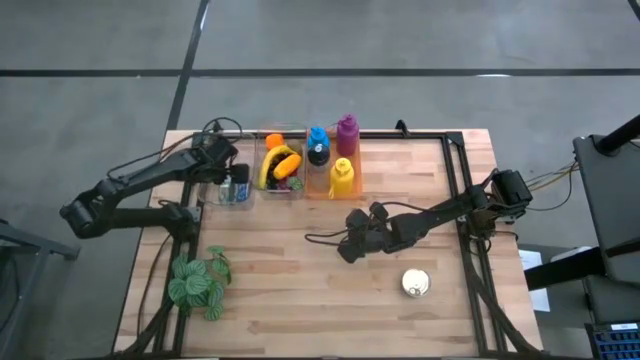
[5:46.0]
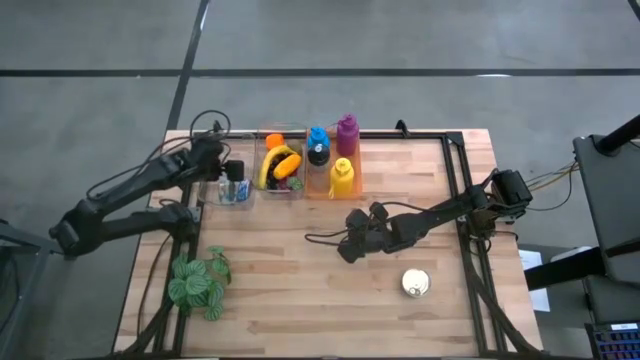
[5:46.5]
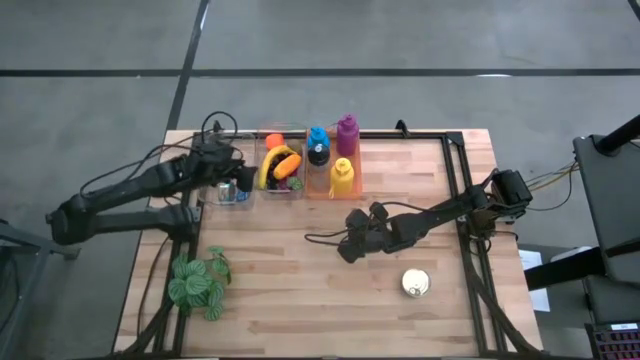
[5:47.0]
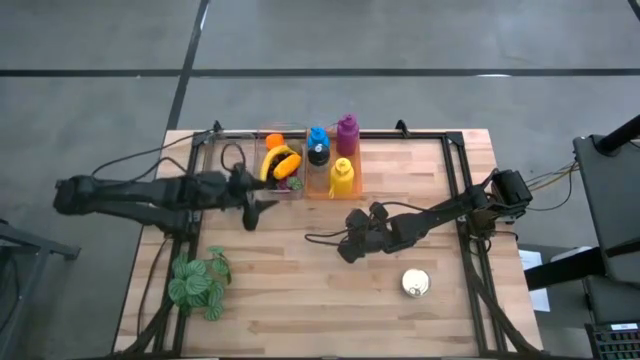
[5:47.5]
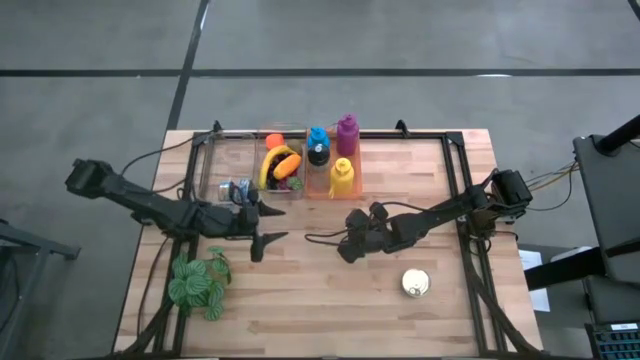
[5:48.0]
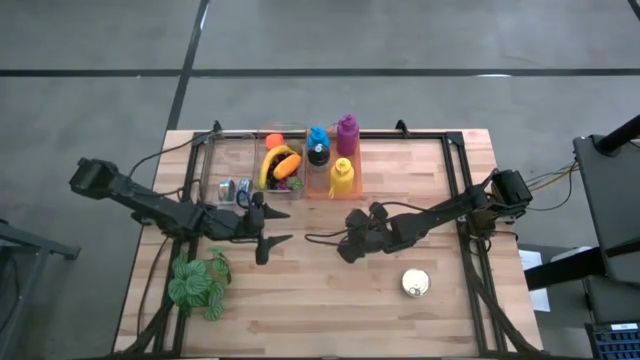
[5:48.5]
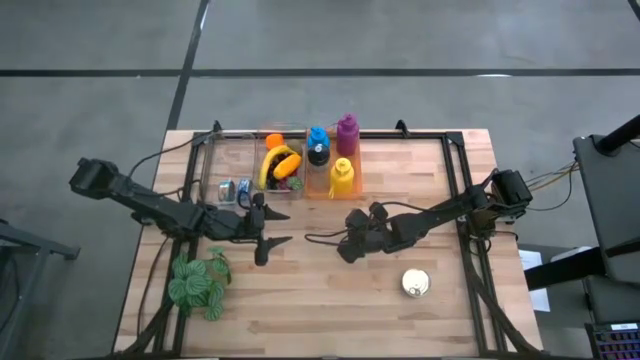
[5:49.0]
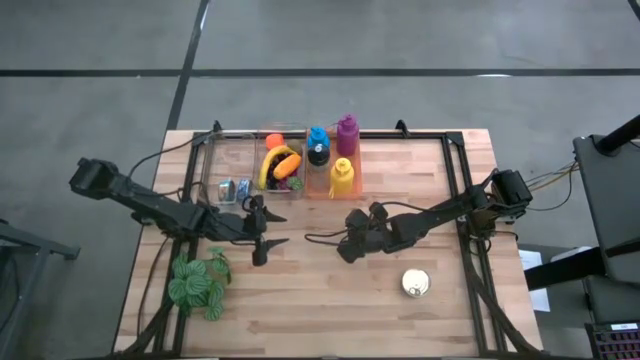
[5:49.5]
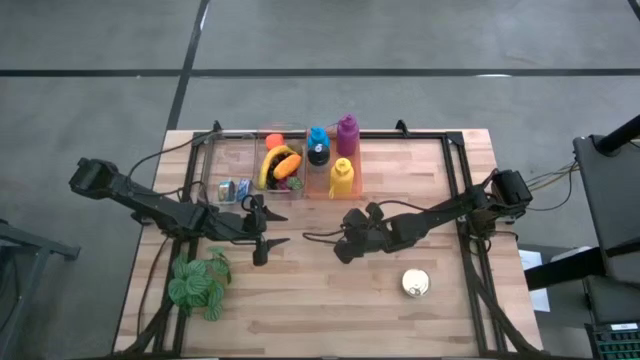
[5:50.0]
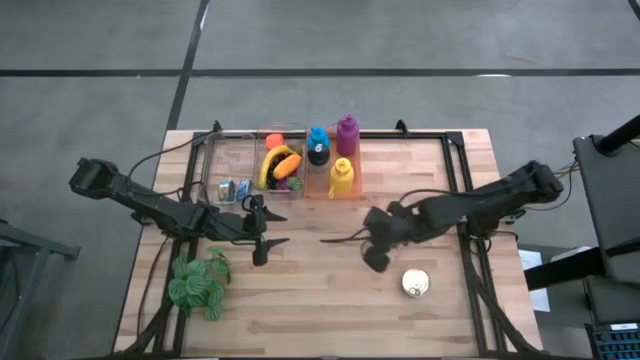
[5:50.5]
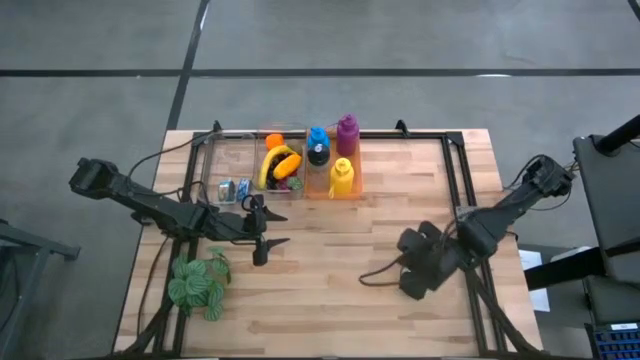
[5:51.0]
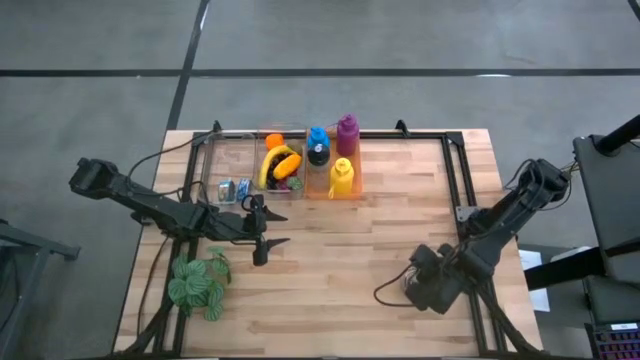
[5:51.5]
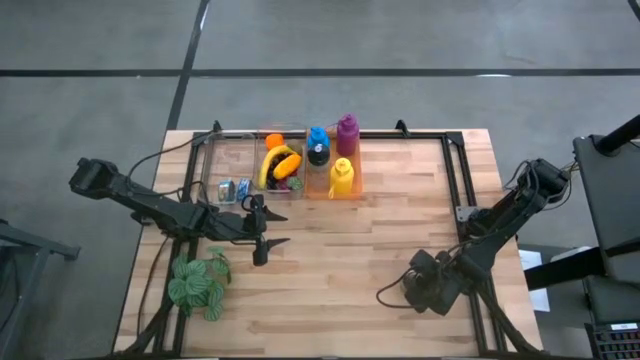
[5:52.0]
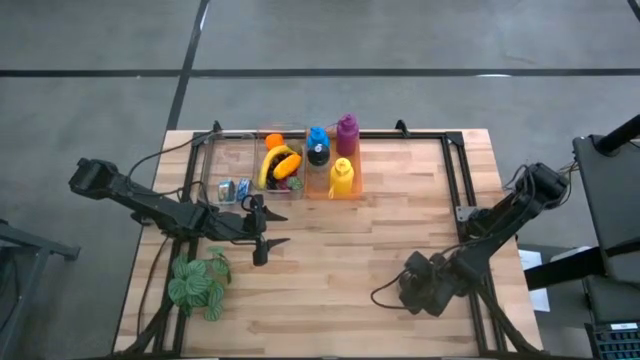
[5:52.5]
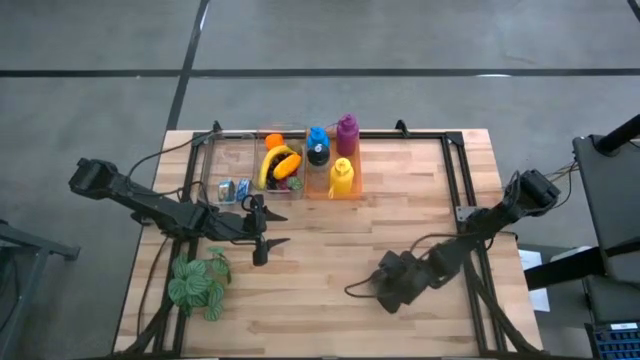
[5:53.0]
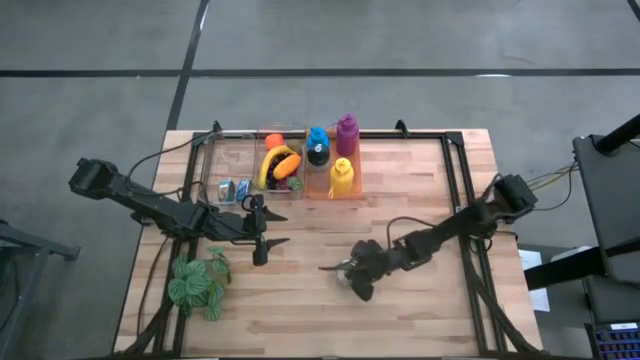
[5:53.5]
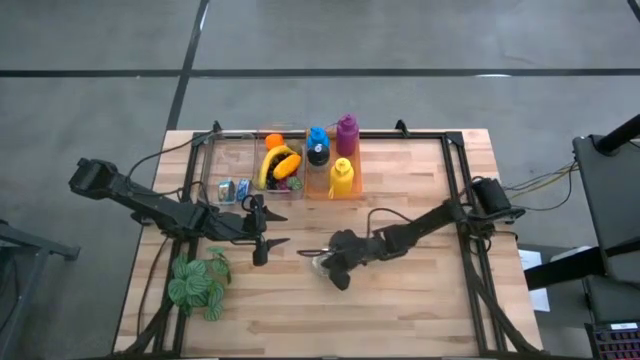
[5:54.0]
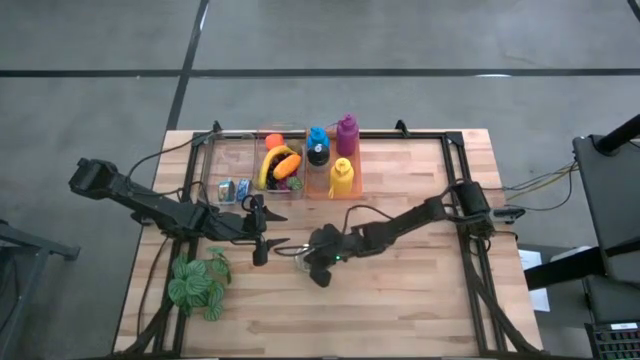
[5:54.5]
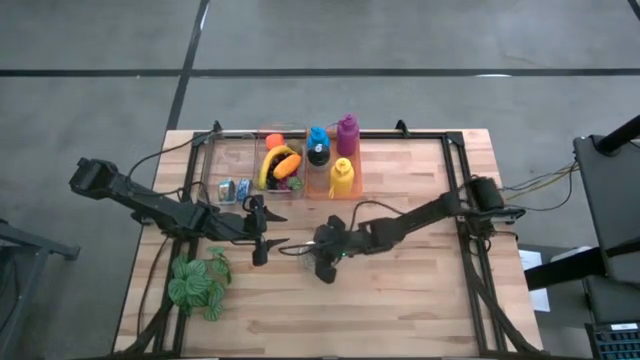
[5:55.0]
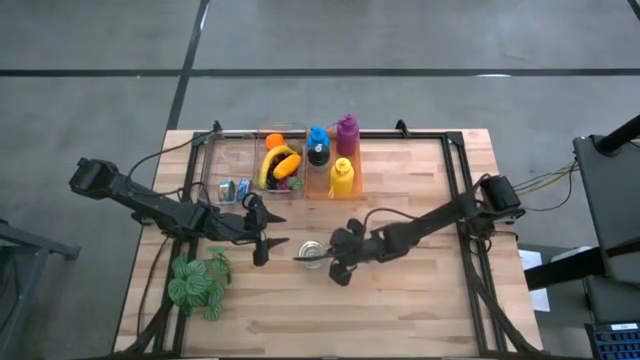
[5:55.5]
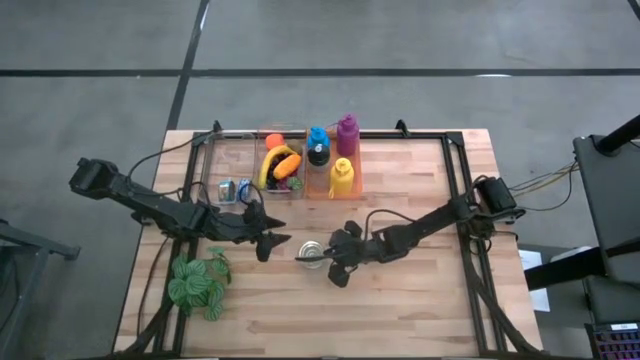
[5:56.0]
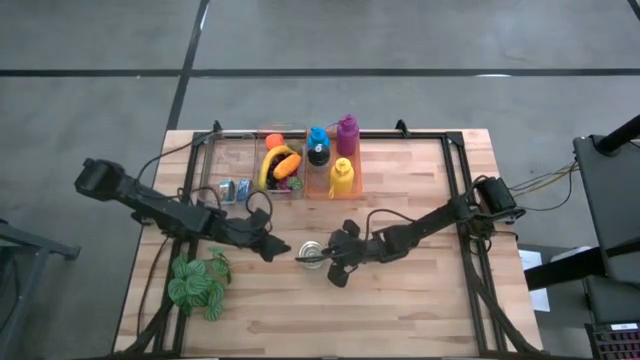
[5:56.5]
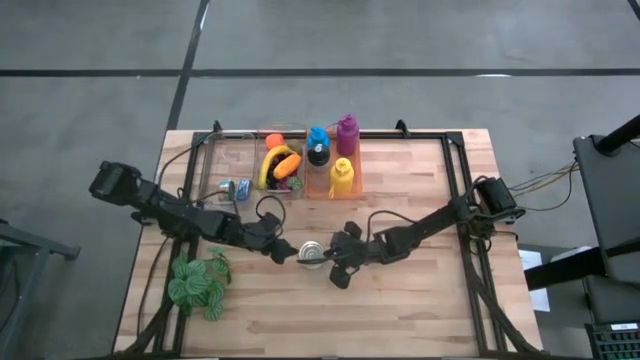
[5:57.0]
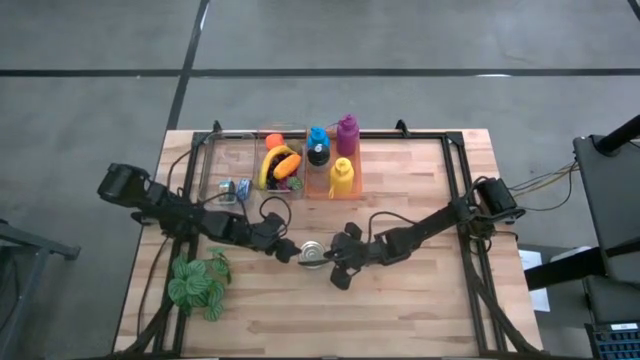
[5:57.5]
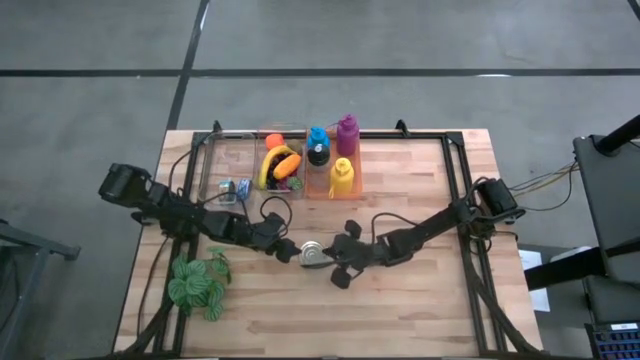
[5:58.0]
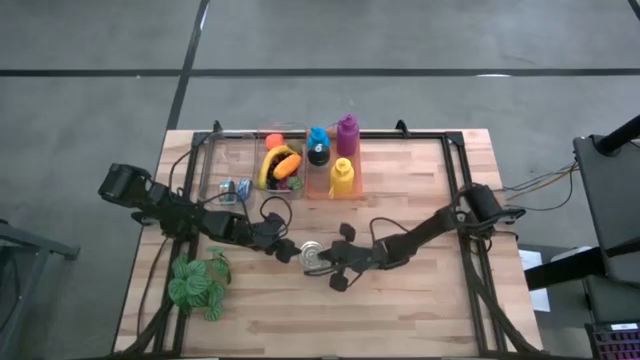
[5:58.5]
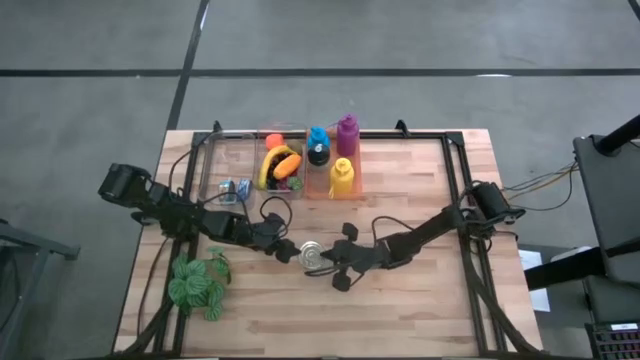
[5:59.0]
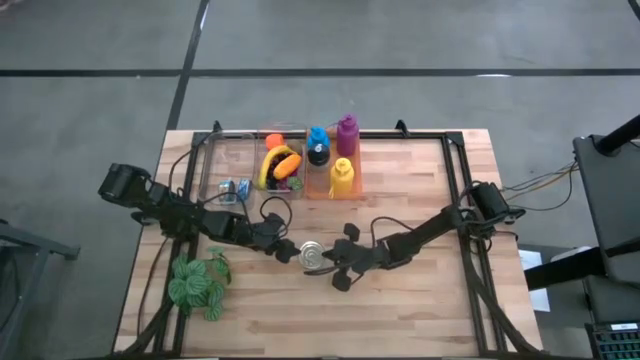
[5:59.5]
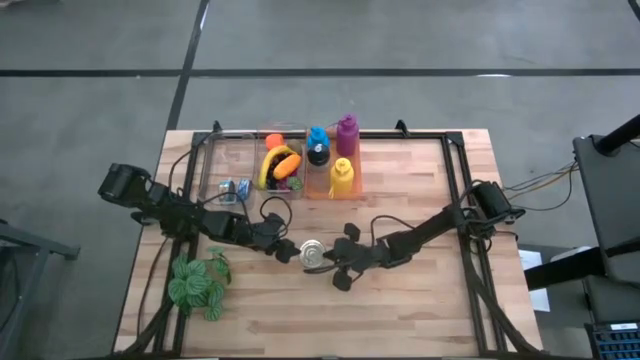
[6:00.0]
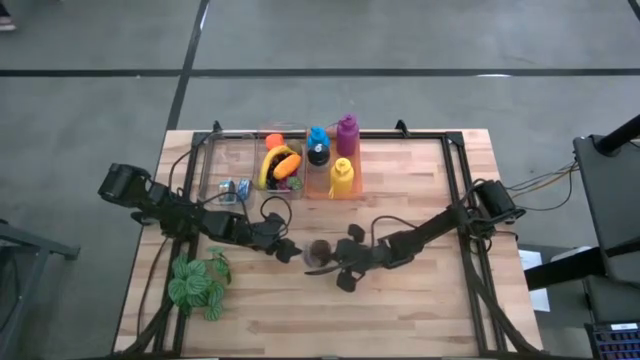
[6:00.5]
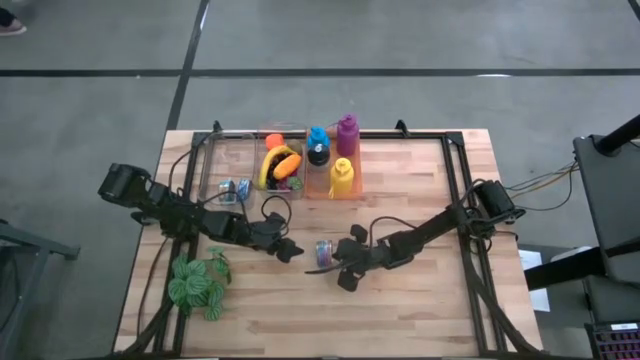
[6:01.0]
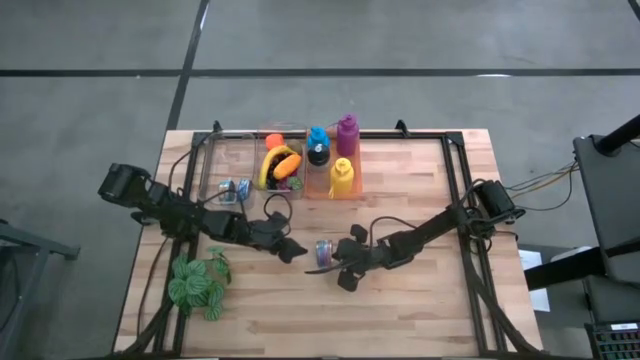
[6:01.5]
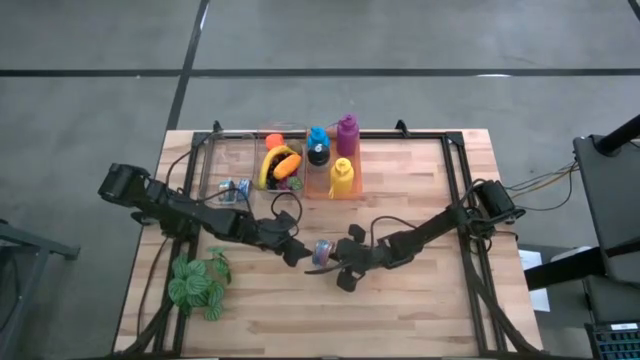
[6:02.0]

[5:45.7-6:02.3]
Task: Pick & Place Food Item
Put the blue pink tuna can into the left transparent bin
